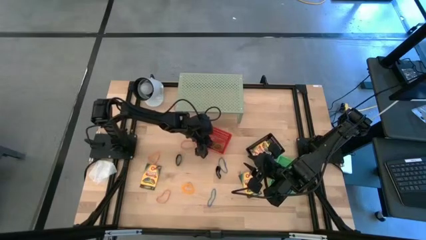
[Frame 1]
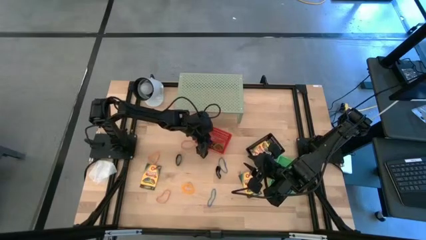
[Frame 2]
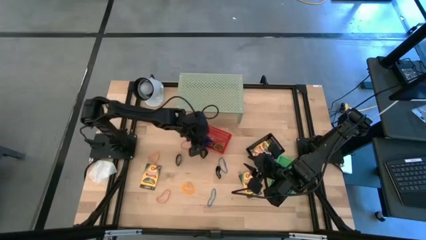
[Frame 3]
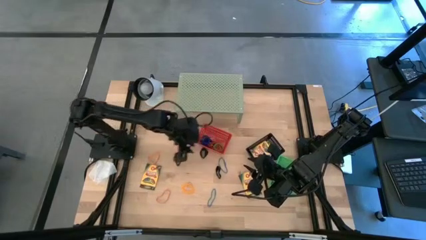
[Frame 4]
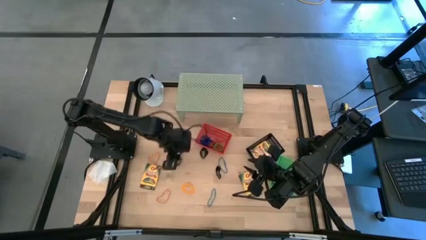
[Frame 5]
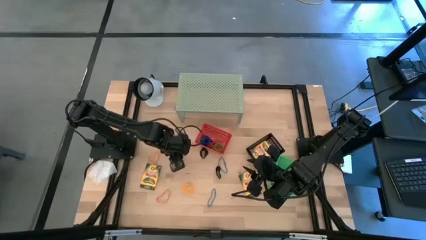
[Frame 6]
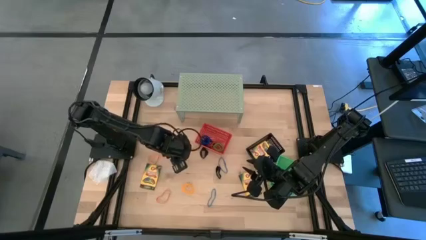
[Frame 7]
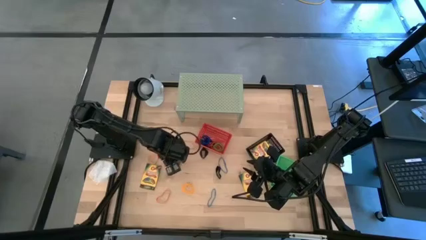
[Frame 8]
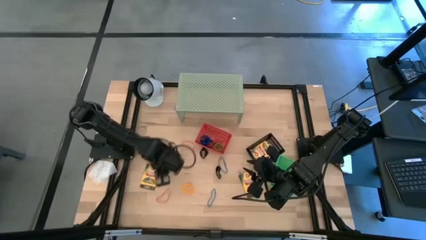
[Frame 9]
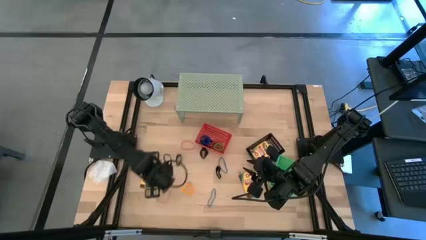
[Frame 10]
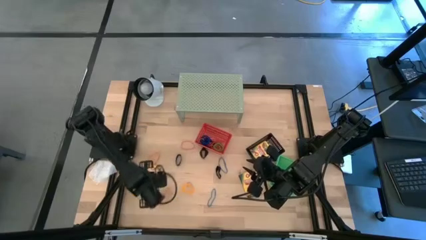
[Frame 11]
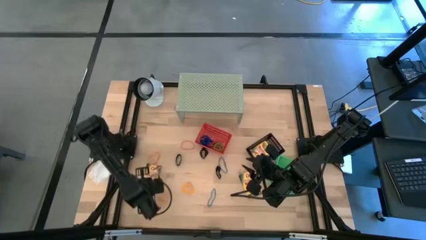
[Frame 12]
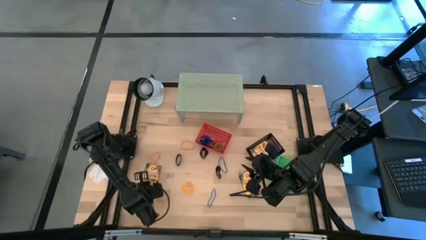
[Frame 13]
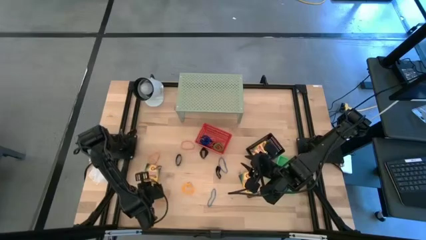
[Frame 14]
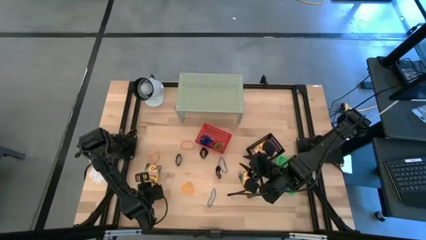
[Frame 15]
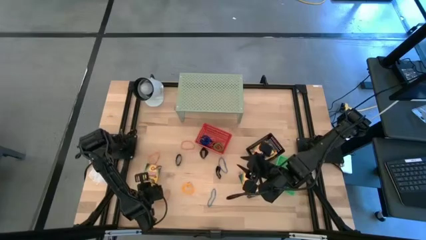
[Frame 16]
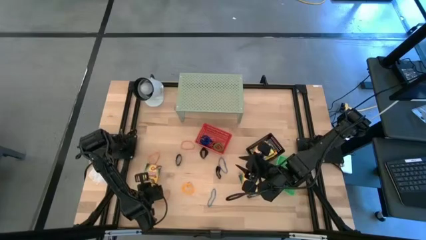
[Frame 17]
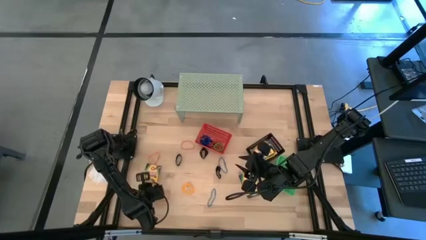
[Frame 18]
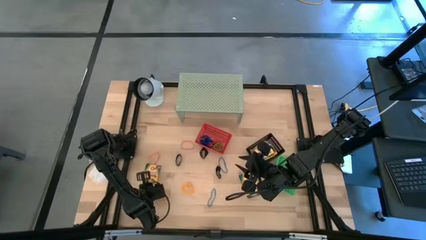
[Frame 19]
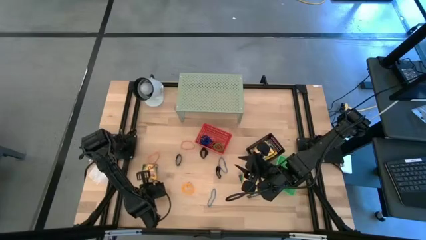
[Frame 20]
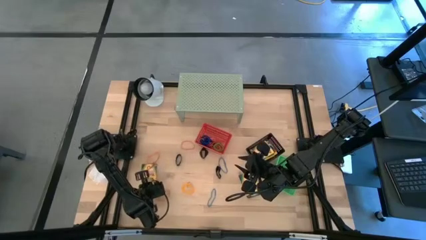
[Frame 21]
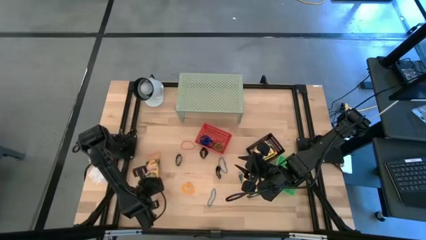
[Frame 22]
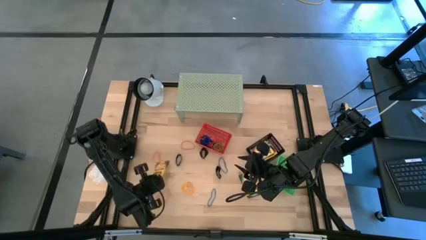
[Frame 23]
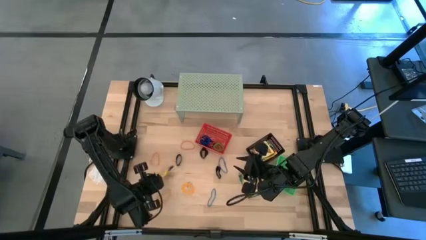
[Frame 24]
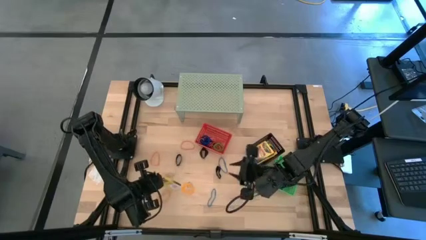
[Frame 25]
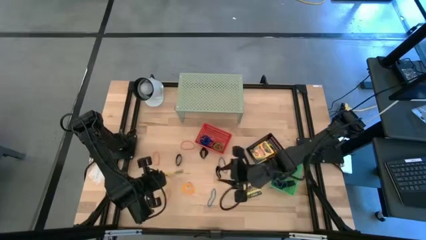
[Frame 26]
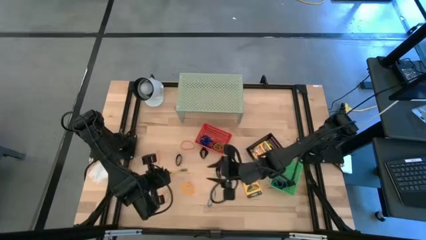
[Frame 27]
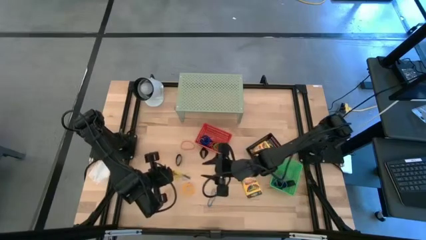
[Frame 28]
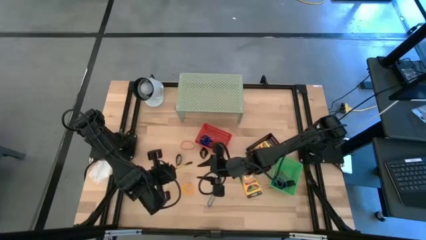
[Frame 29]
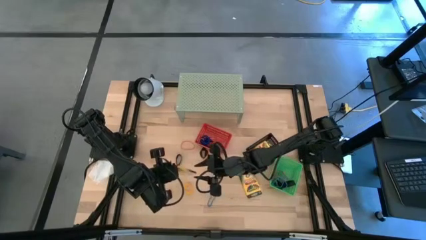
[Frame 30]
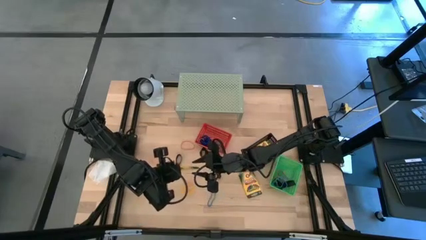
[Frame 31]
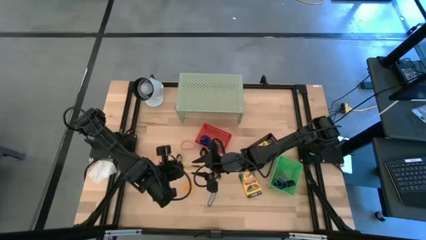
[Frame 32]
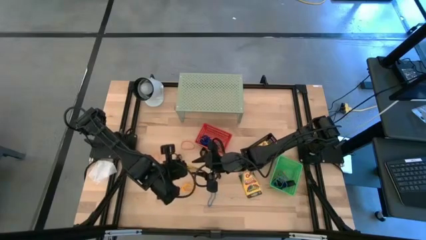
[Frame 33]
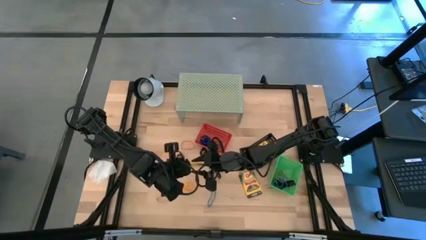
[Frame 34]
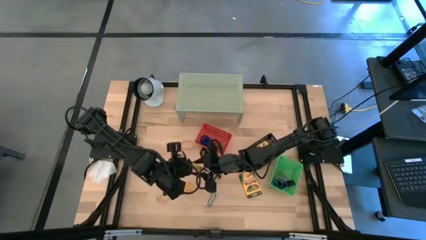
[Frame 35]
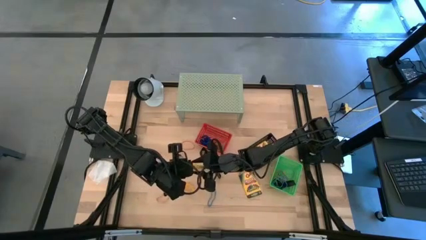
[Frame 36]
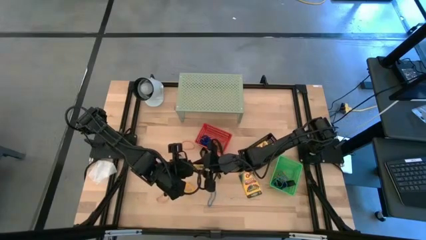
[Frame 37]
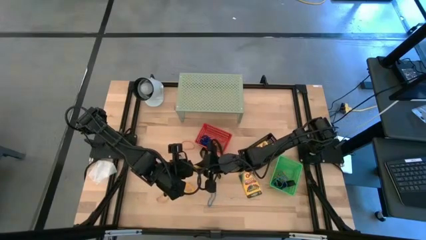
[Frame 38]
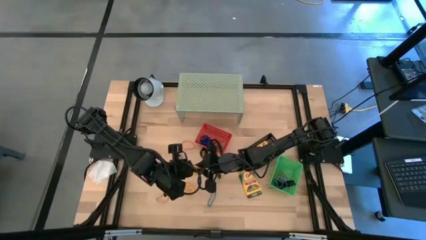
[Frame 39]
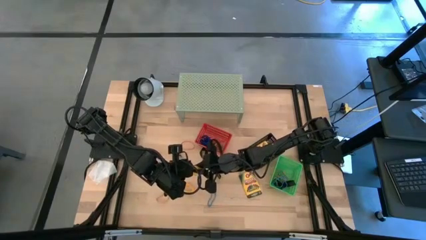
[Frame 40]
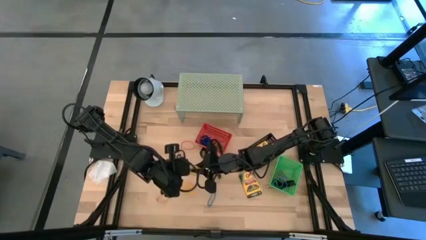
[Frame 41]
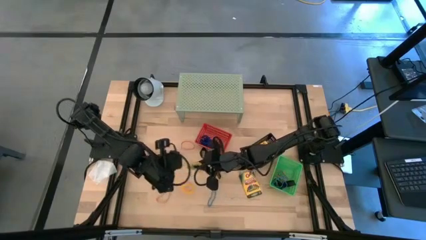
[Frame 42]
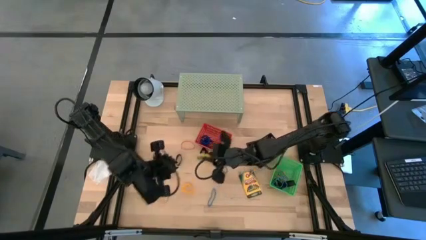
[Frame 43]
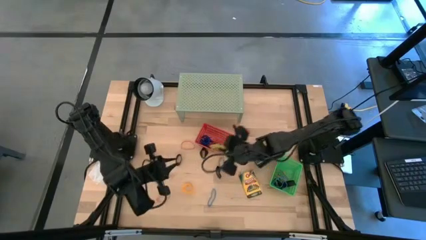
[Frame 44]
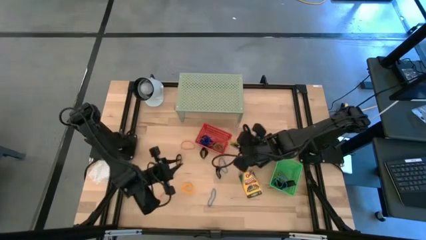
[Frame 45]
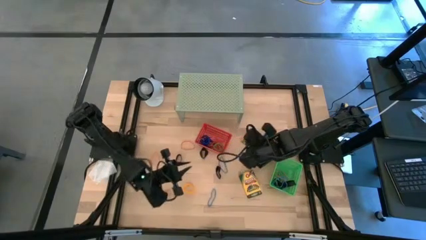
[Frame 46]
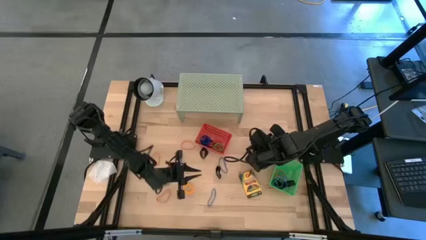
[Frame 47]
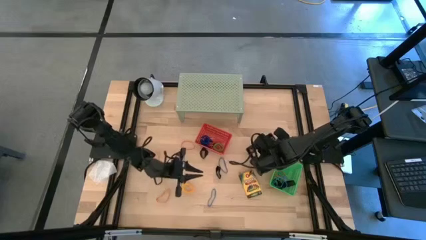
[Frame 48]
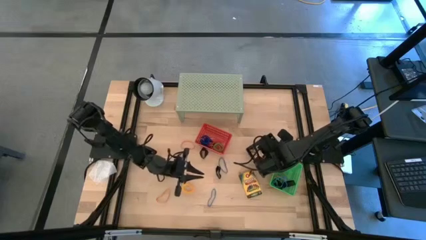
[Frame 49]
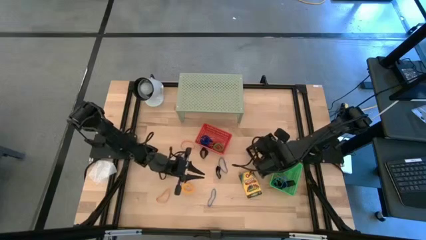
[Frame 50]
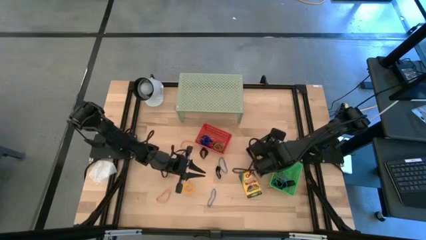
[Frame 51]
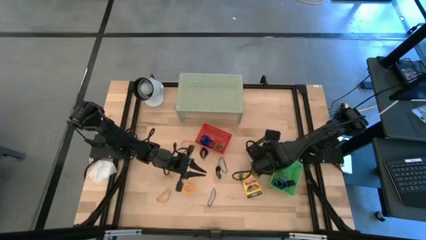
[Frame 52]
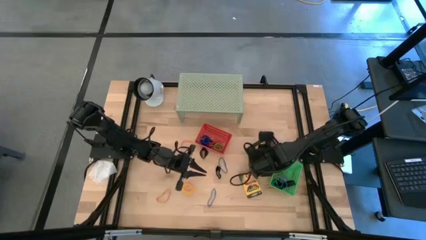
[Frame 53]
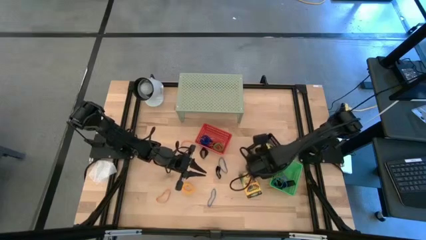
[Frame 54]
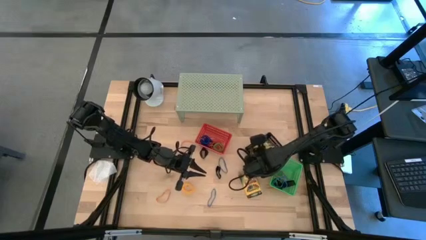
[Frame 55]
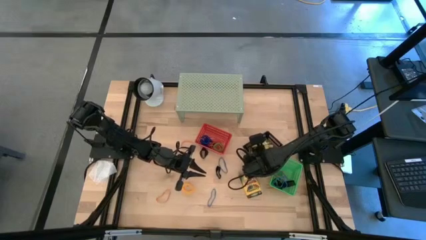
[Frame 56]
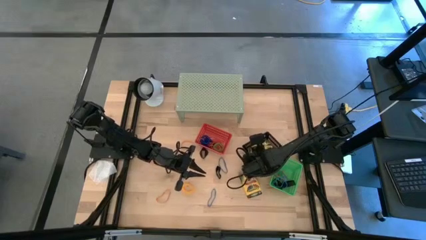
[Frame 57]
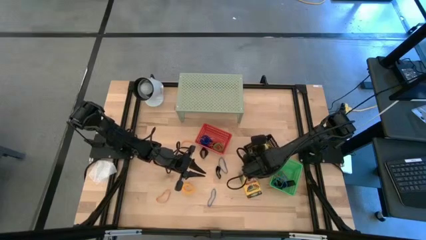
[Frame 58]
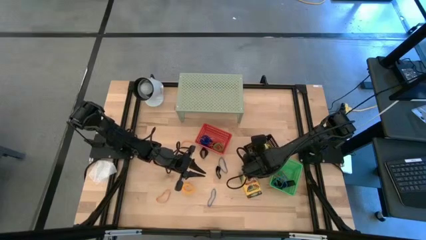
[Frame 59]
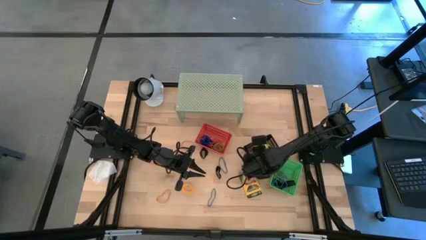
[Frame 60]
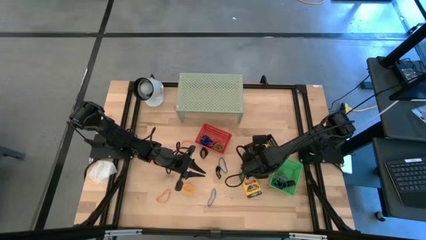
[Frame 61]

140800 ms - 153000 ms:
Task: Pick & Place Office Desk Supplies
Put the crayon box into the black bin
